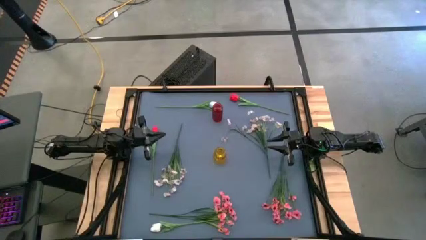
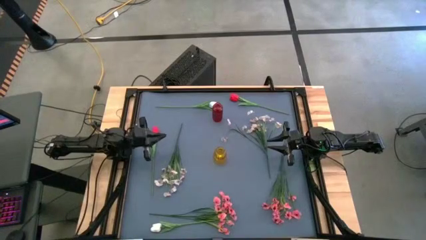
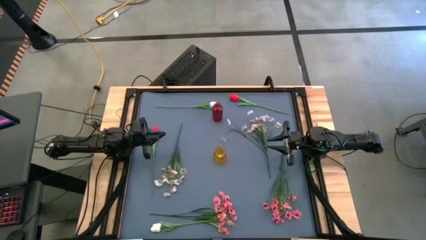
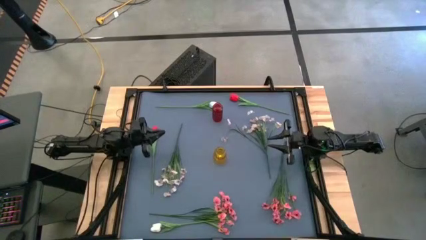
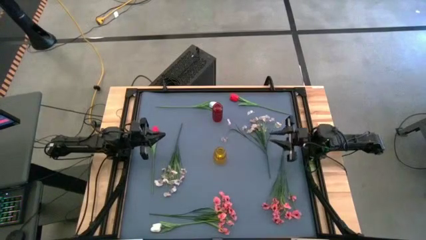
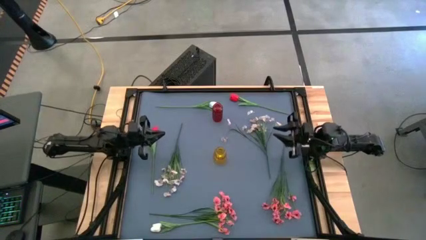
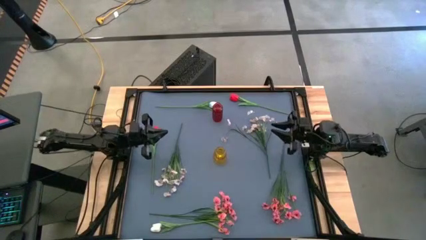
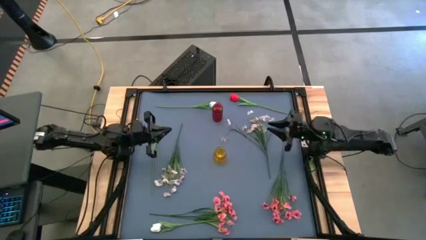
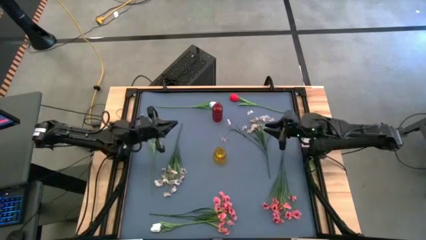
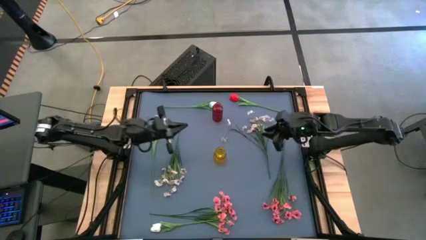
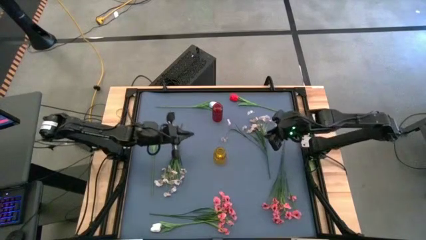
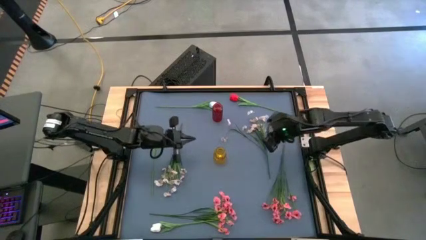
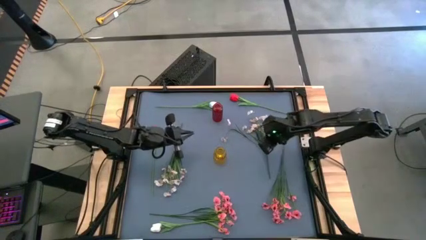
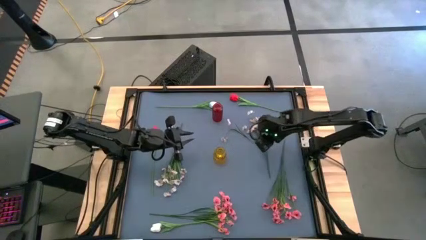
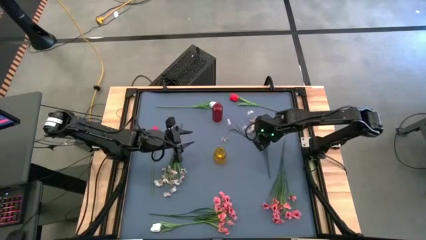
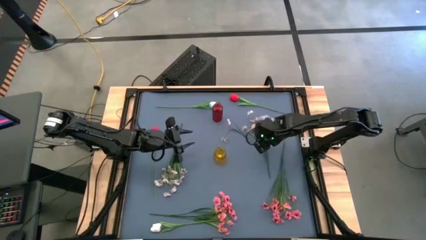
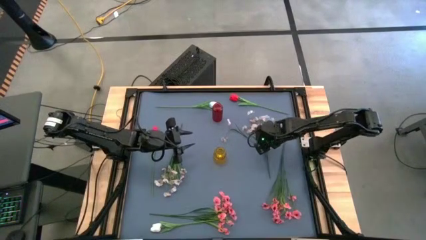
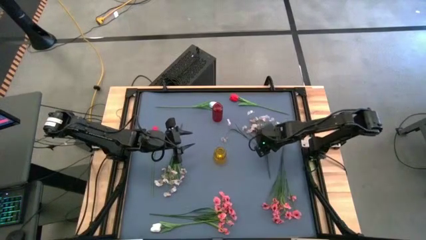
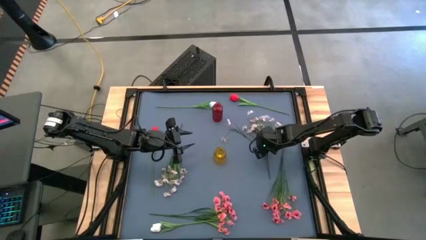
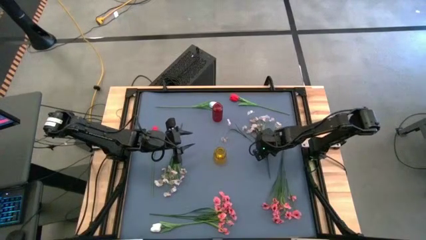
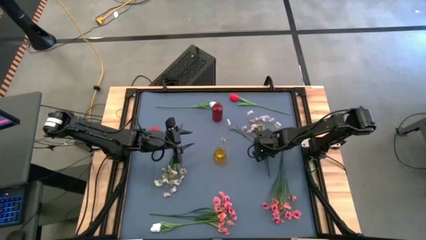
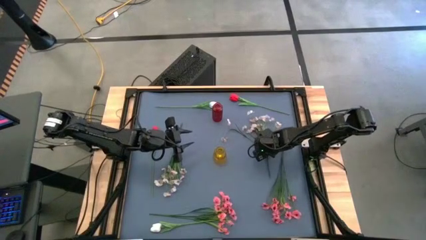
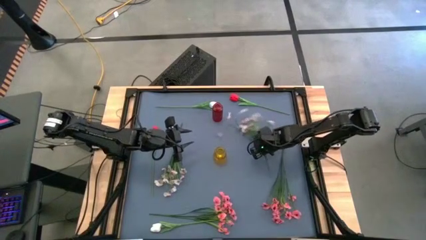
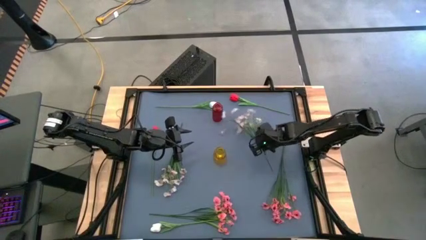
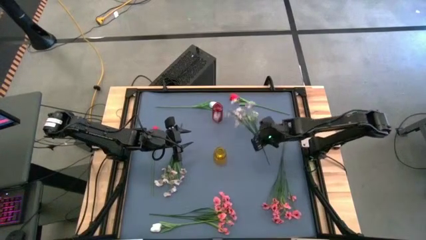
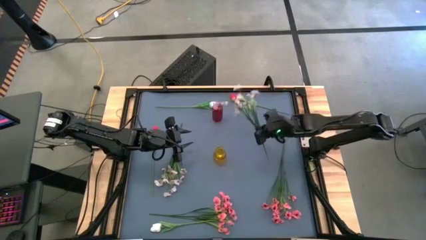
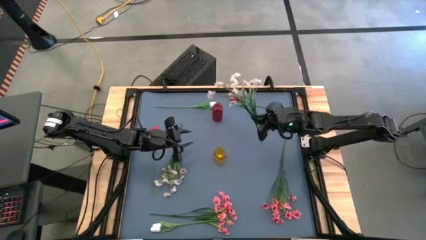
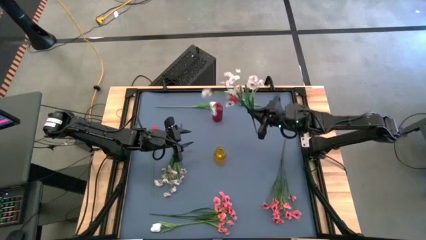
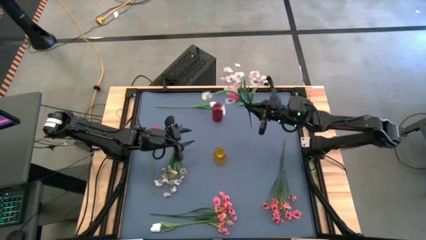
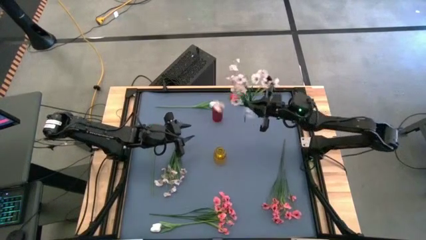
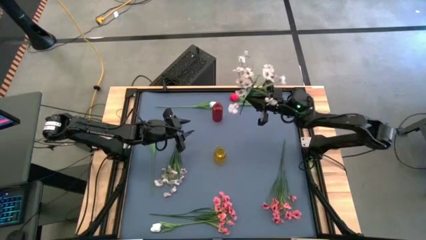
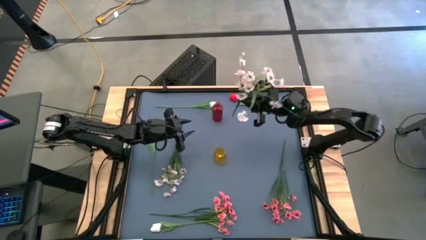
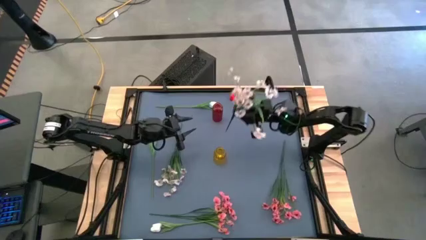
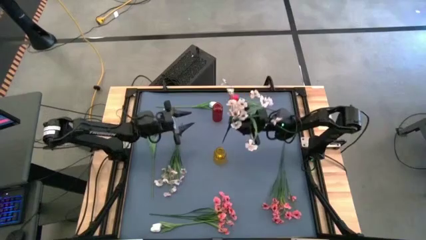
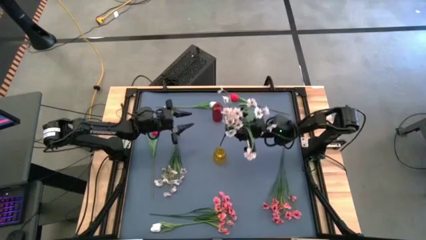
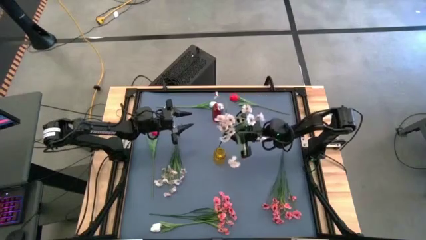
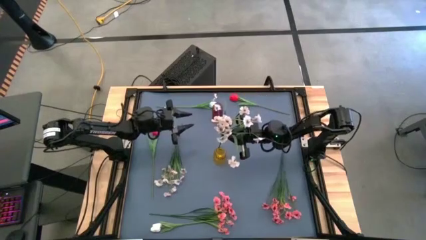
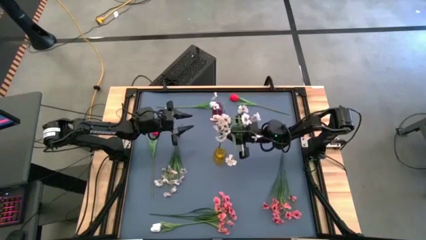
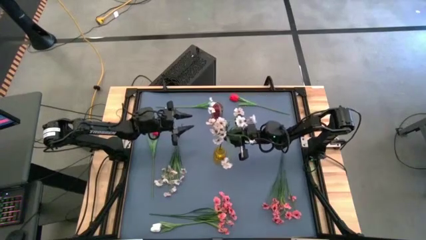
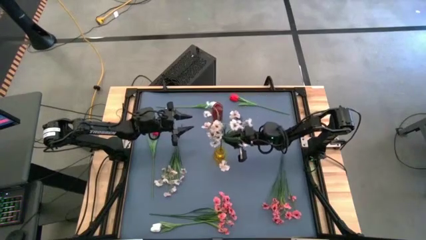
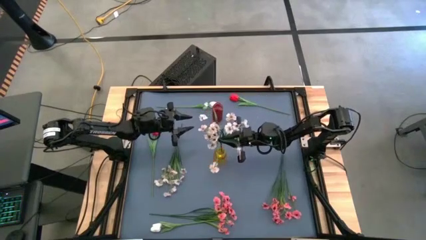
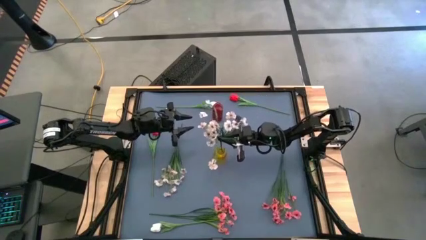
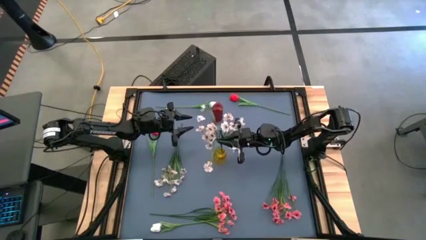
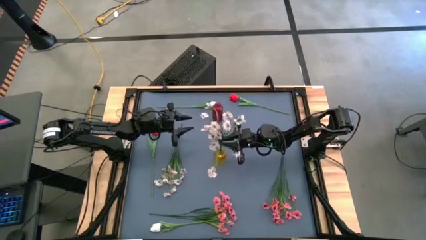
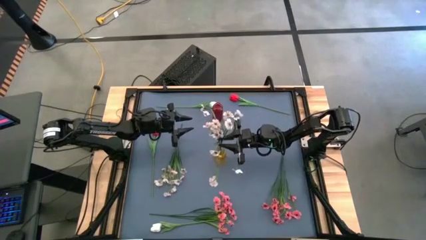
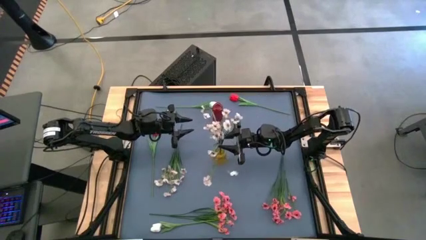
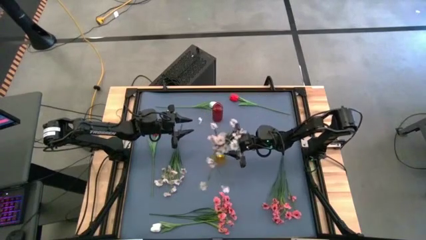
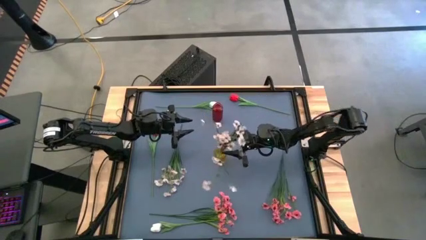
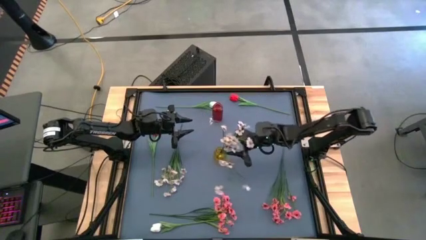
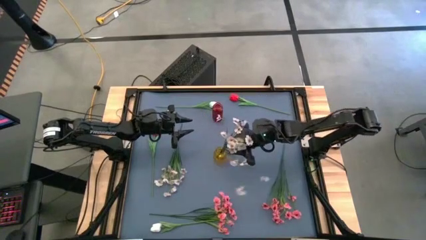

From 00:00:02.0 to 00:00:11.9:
Task: Sort flowers into vase by color
Put the right white flowers into the yellow flower vase
